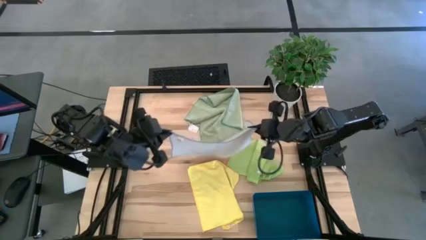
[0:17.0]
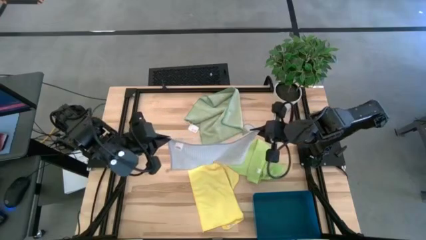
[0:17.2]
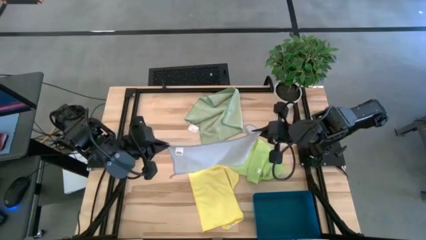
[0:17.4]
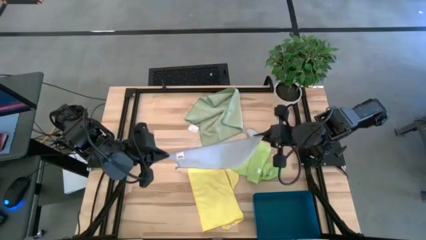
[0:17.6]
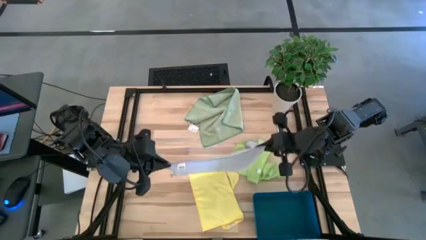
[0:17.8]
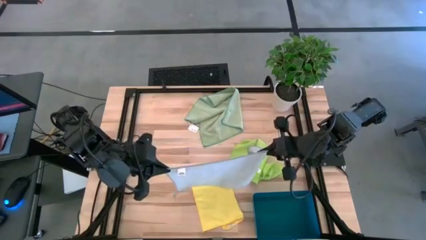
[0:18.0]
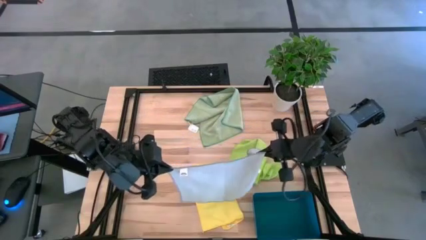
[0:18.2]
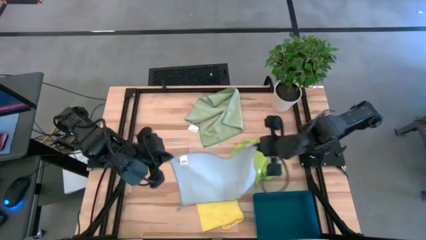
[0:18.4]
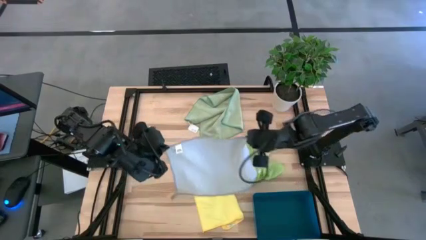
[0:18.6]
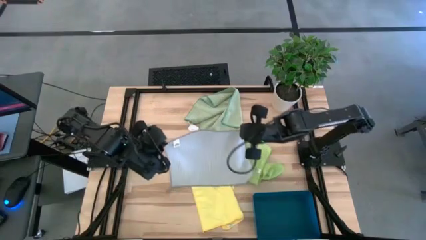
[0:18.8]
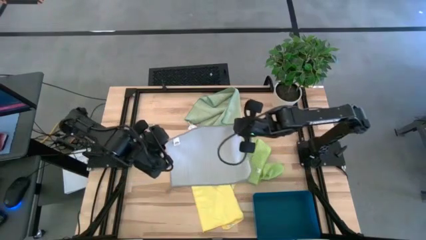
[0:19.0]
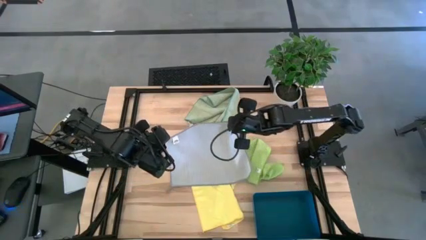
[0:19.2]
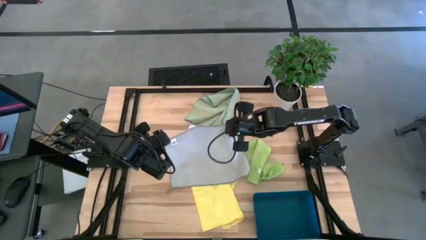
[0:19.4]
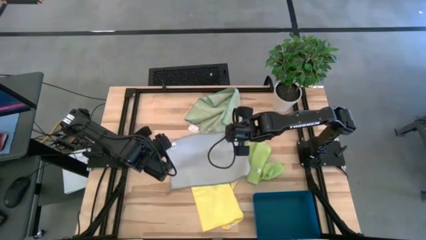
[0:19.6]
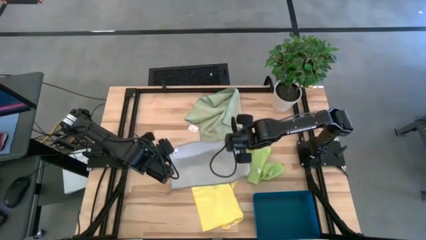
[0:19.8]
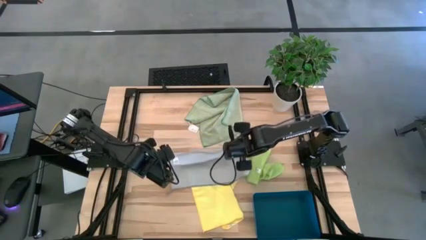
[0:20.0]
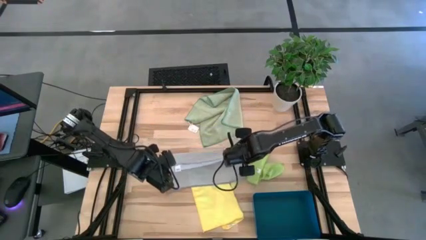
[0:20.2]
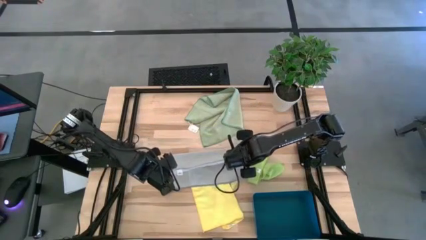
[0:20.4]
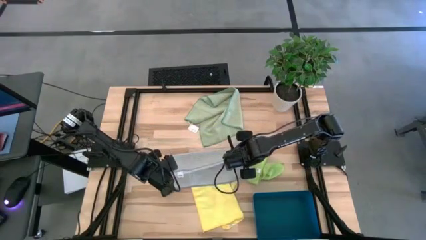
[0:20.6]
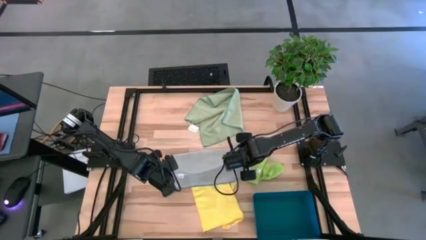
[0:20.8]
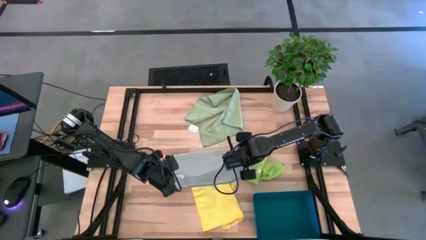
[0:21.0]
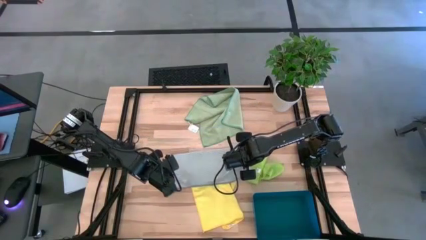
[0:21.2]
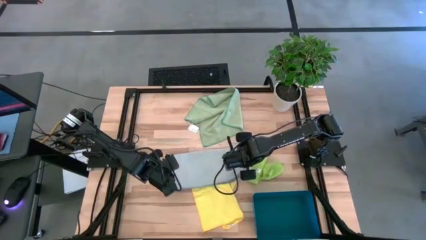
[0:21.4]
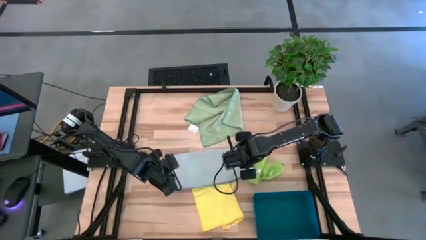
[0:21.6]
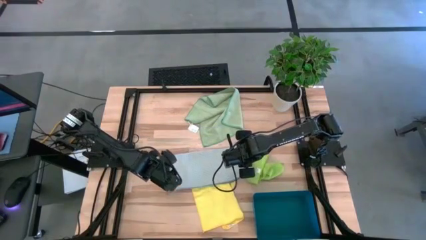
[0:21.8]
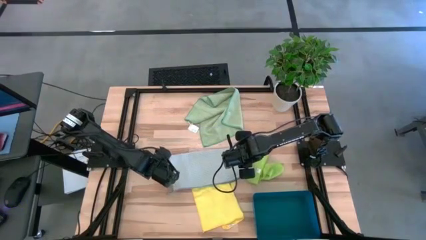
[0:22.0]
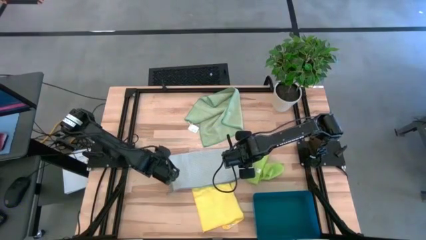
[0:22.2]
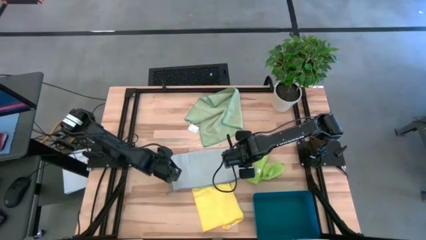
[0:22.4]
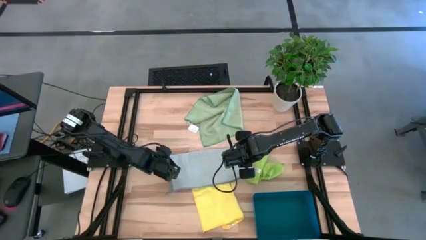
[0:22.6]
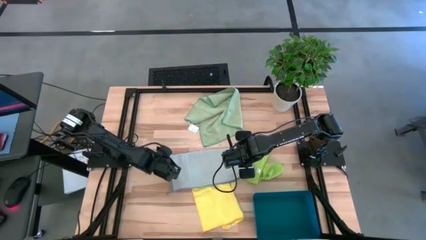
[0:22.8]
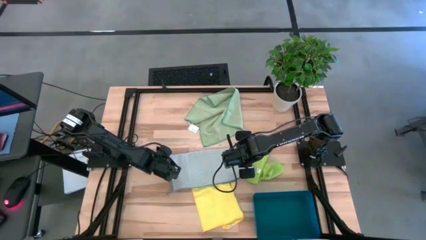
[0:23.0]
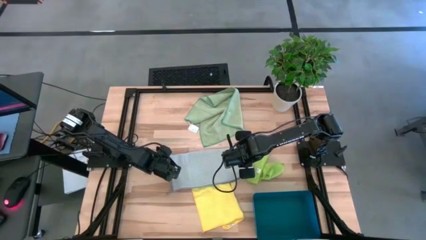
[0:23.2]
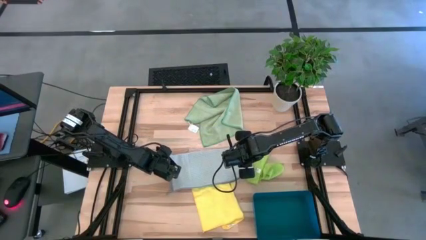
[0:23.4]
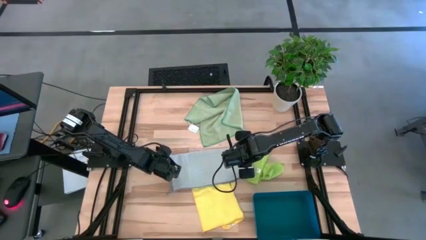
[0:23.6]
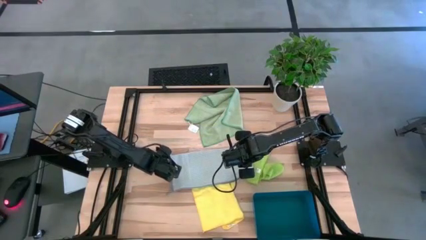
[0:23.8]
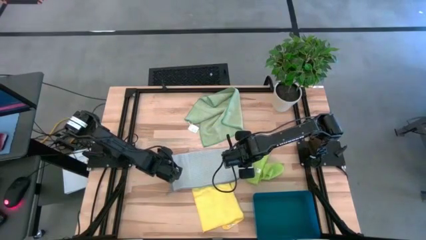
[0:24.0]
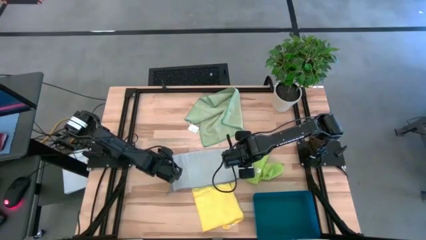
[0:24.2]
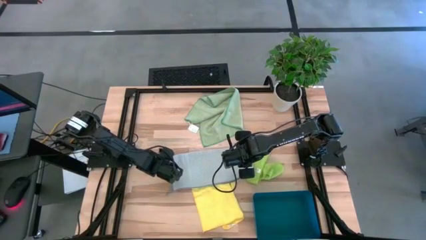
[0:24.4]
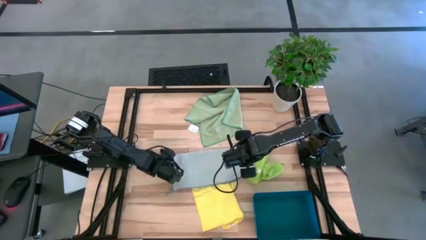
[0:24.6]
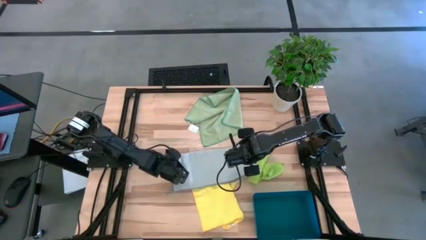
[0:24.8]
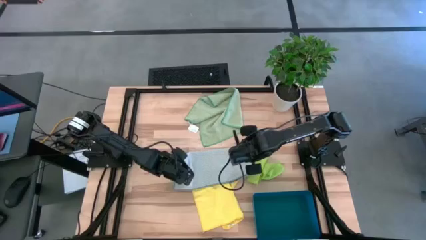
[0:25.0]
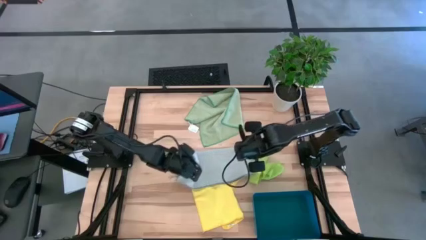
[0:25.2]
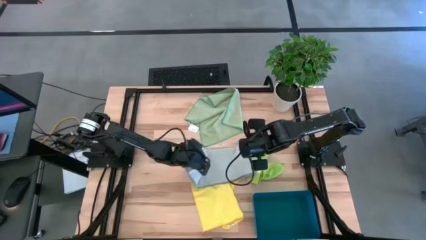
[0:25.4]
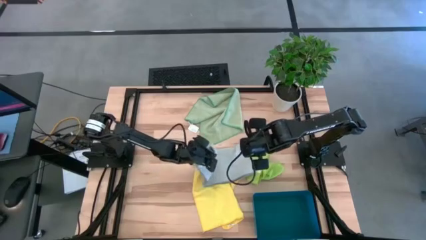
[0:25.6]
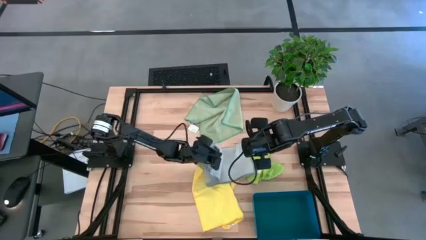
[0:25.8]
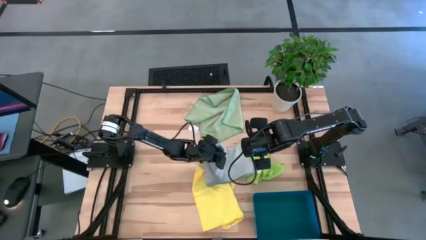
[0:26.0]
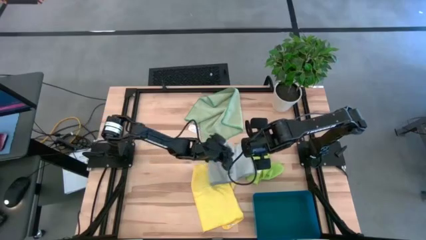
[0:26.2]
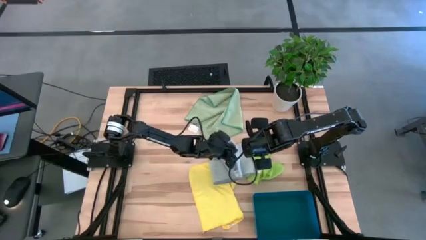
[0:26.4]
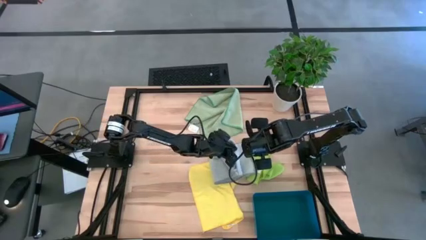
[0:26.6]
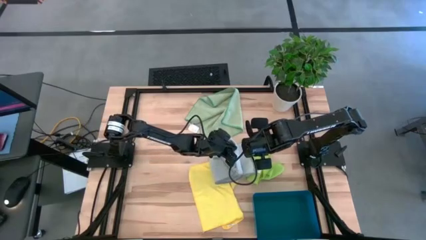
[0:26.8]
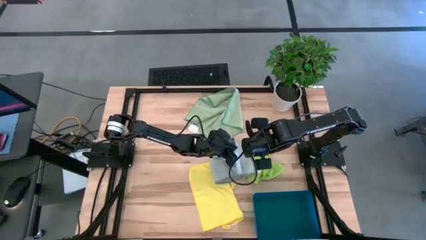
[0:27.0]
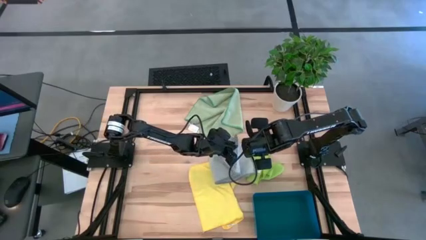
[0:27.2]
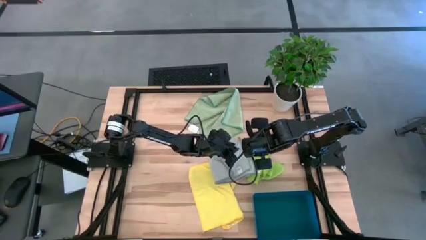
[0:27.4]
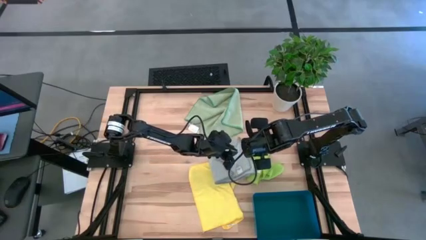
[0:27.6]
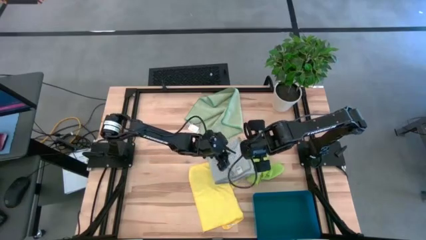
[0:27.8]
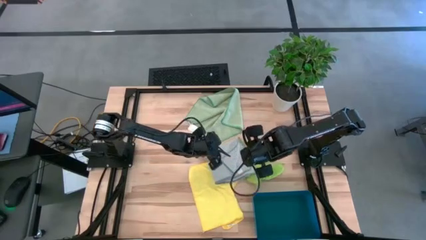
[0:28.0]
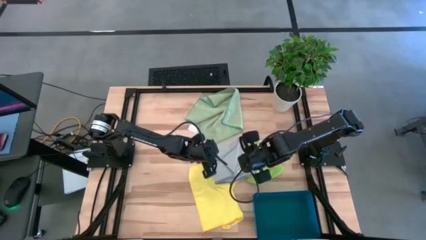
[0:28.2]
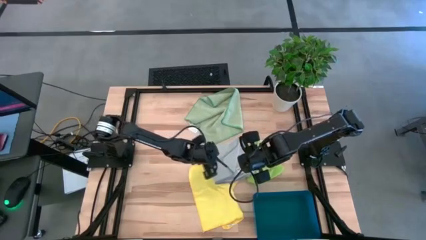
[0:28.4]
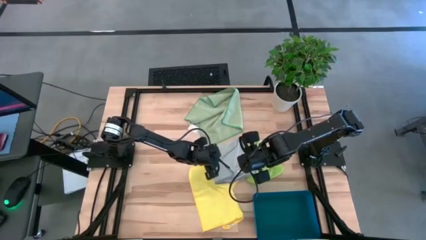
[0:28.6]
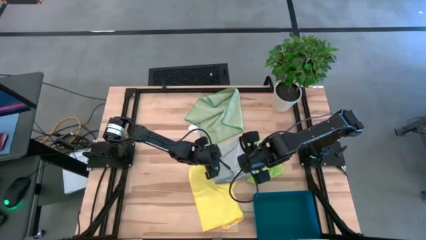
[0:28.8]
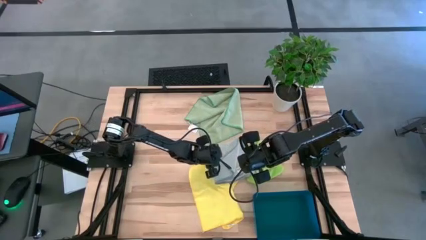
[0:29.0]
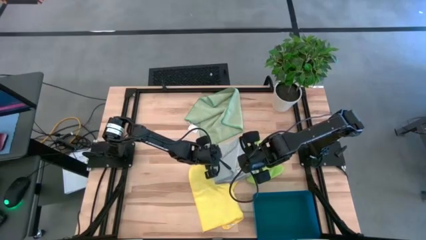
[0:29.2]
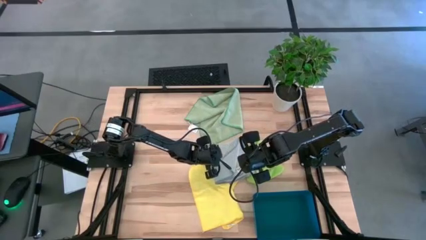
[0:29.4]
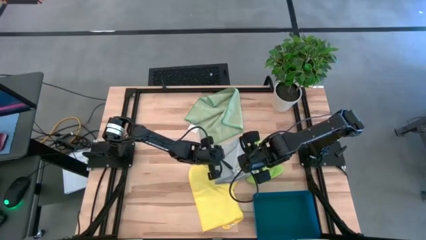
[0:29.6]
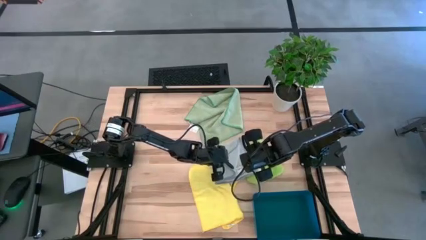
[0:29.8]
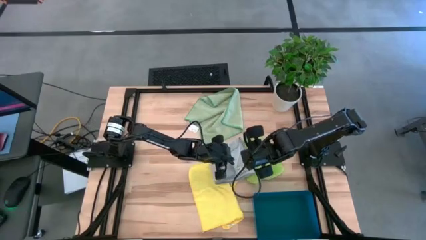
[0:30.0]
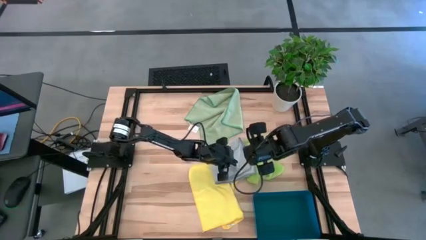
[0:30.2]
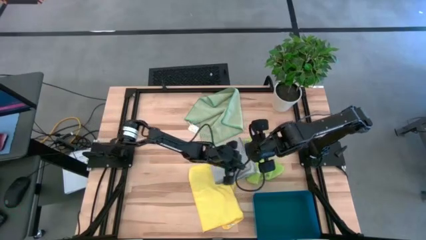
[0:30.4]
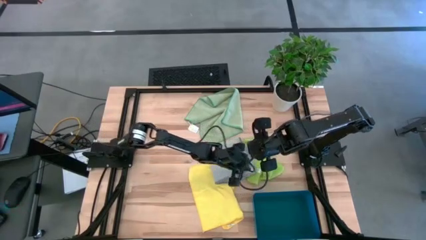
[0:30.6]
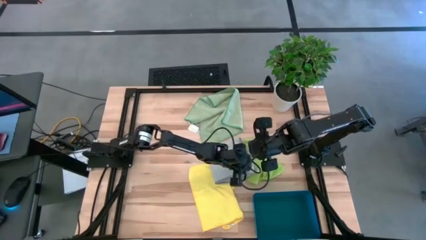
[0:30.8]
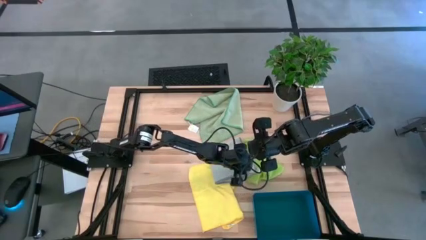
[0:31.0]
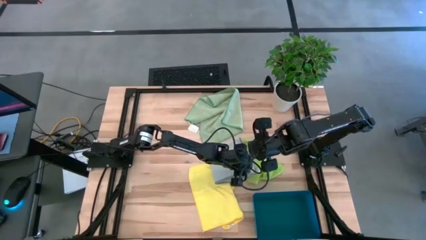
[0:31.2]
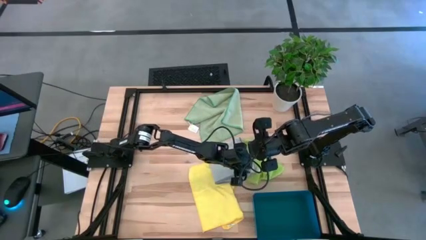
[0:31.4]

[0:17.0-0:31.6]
Task: Fold microfiber towels
Fold the gray towel
